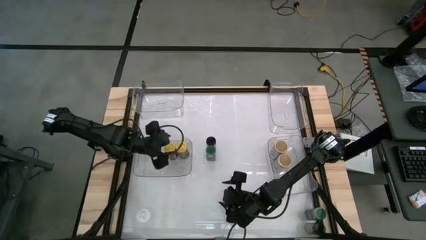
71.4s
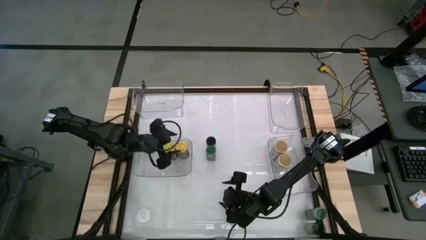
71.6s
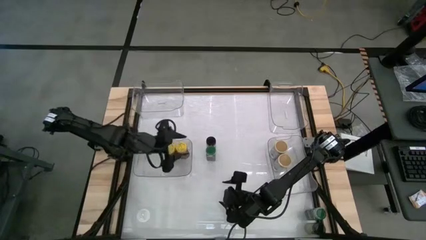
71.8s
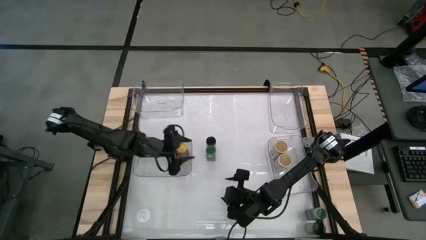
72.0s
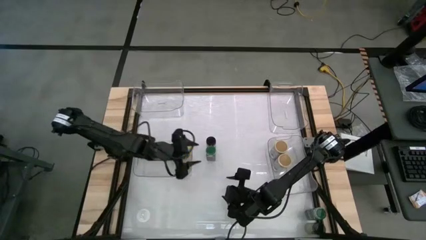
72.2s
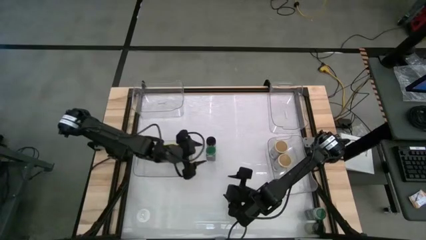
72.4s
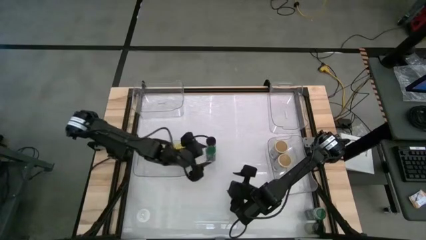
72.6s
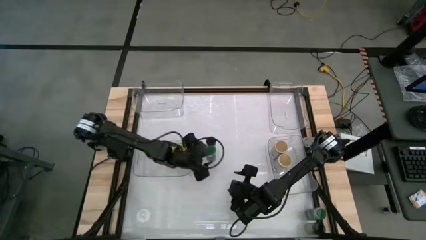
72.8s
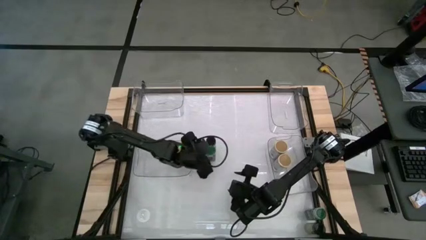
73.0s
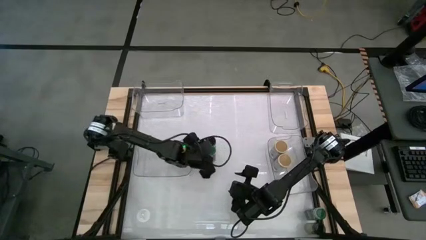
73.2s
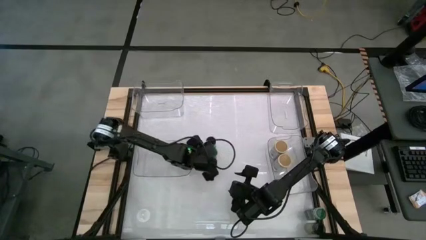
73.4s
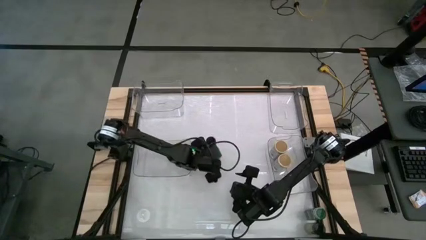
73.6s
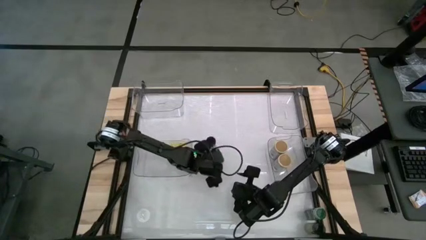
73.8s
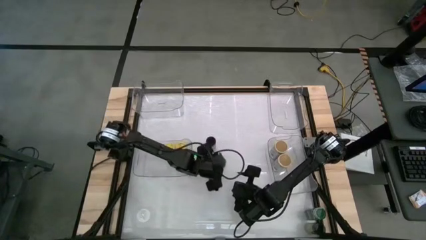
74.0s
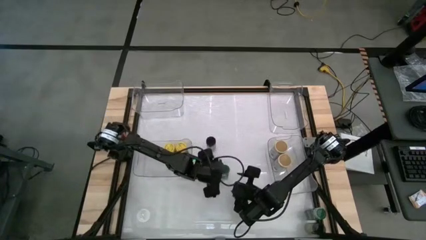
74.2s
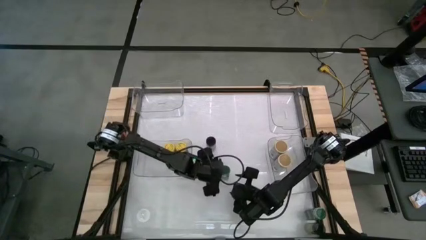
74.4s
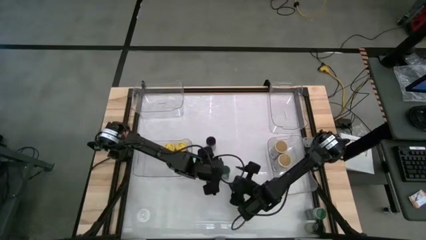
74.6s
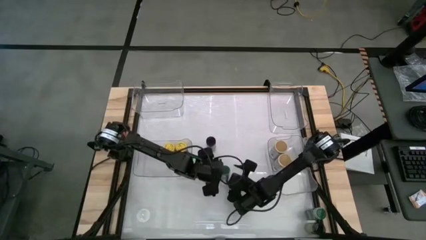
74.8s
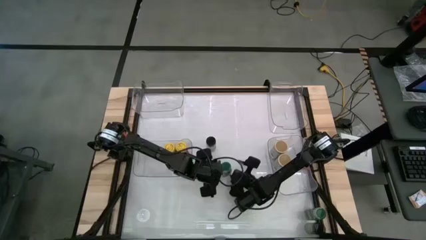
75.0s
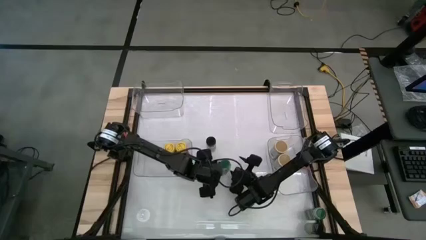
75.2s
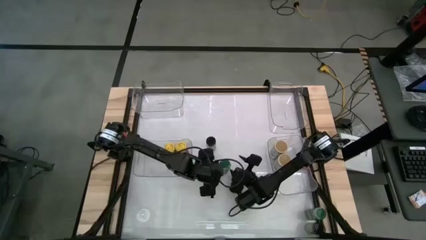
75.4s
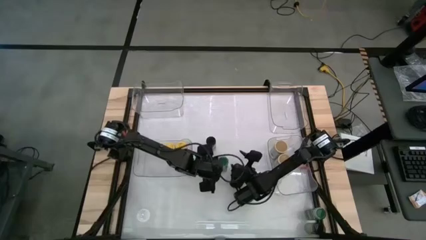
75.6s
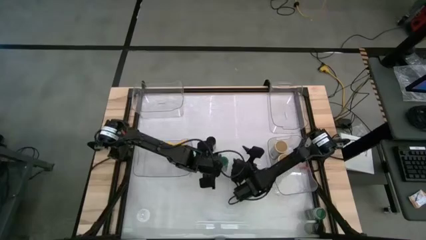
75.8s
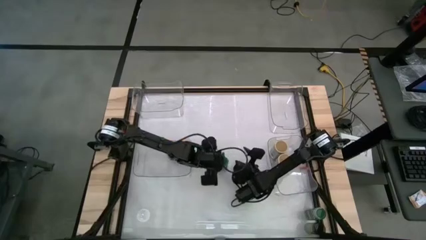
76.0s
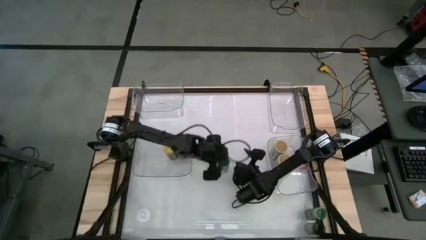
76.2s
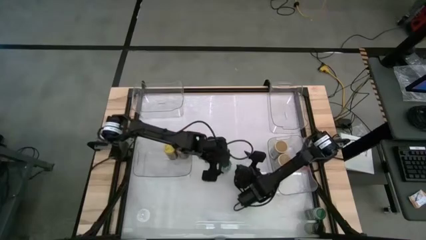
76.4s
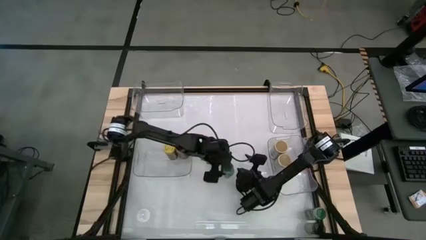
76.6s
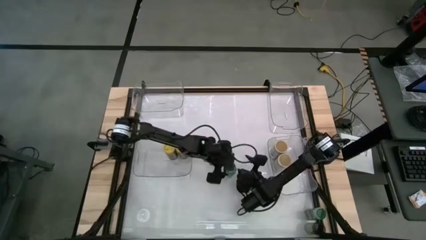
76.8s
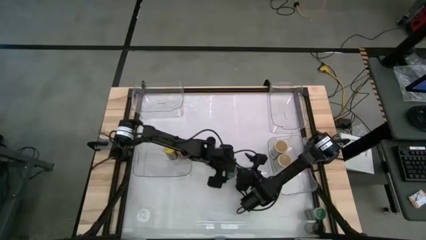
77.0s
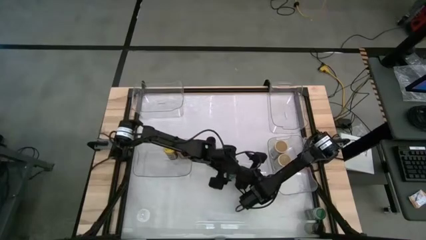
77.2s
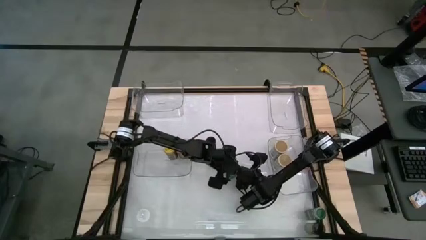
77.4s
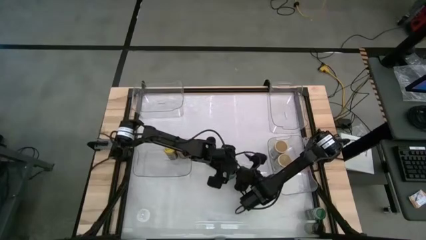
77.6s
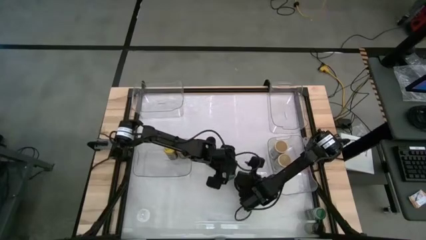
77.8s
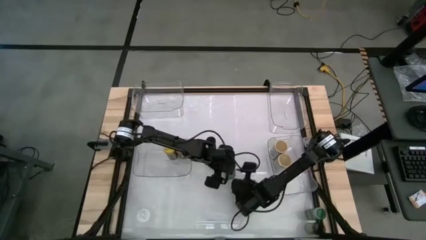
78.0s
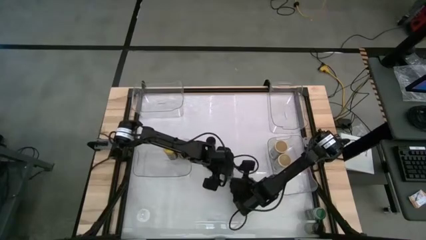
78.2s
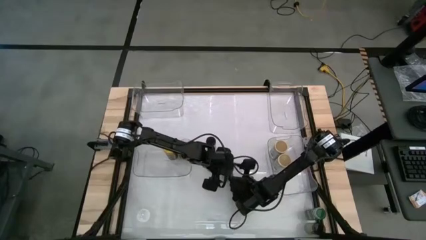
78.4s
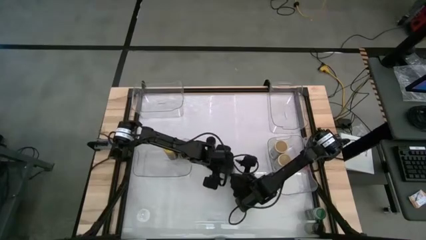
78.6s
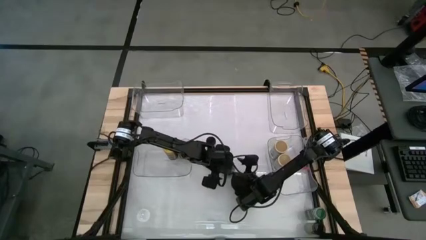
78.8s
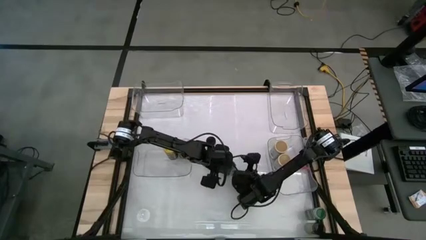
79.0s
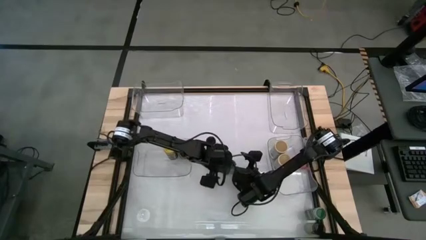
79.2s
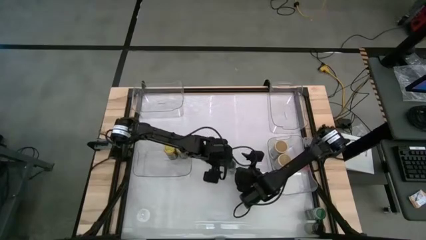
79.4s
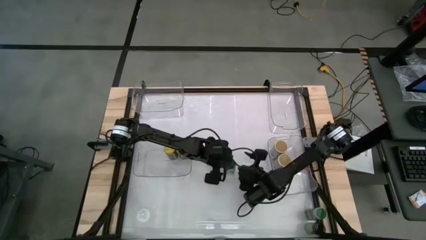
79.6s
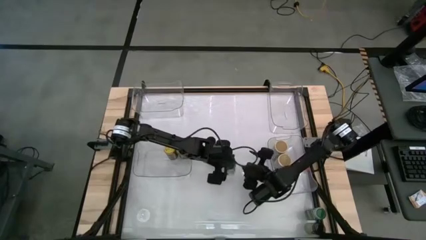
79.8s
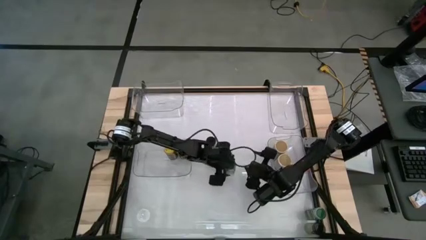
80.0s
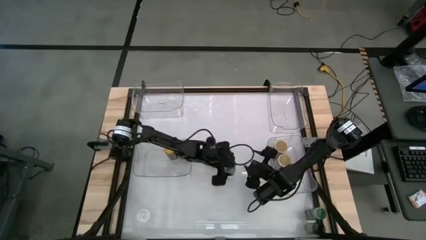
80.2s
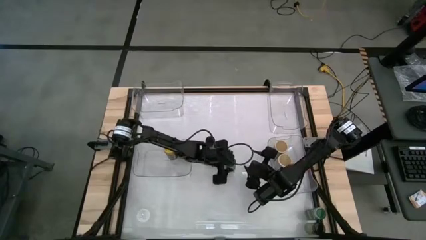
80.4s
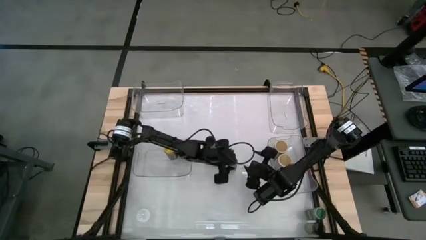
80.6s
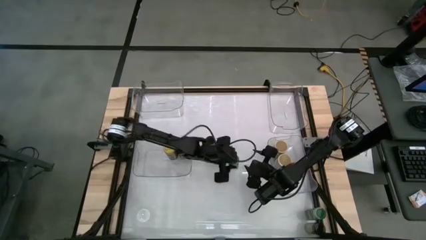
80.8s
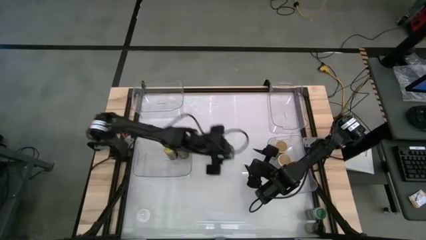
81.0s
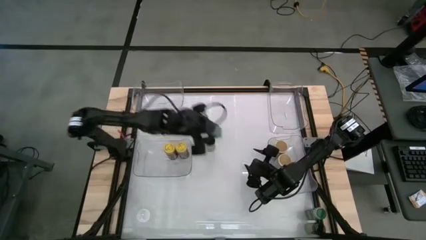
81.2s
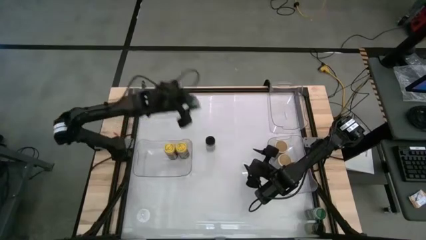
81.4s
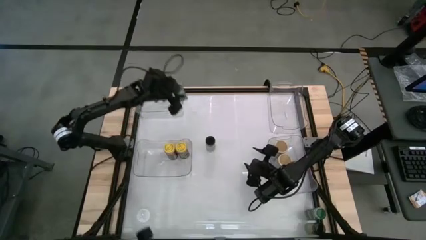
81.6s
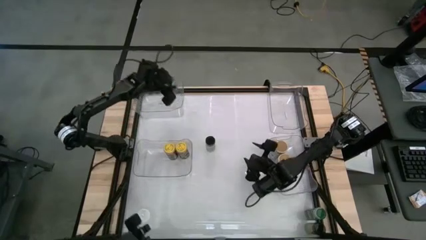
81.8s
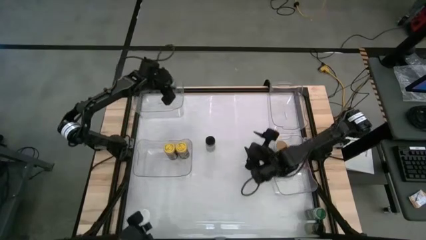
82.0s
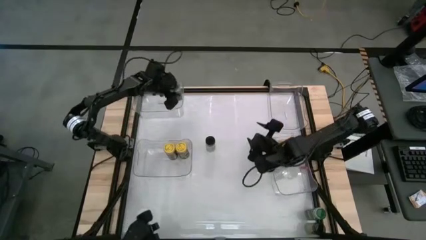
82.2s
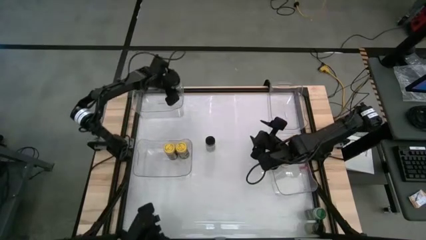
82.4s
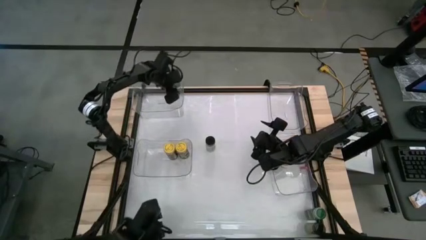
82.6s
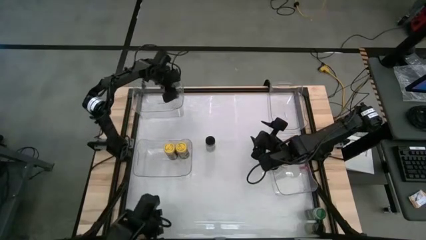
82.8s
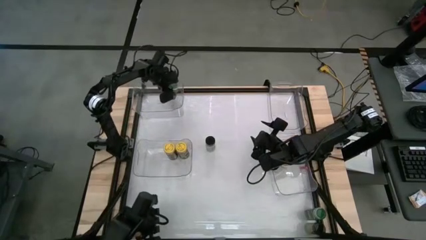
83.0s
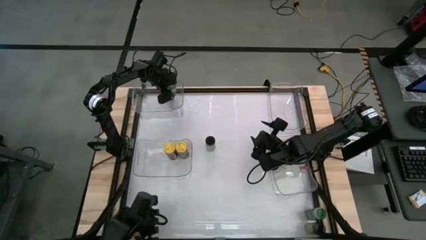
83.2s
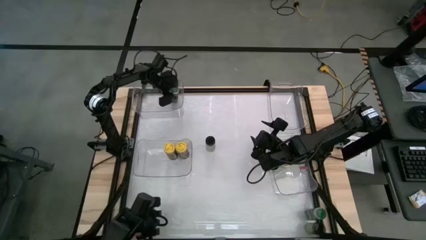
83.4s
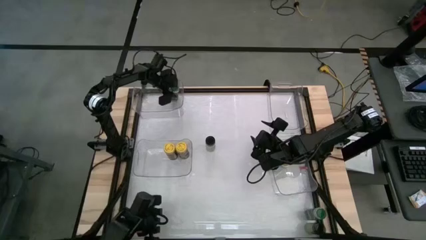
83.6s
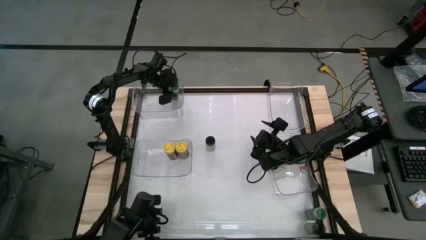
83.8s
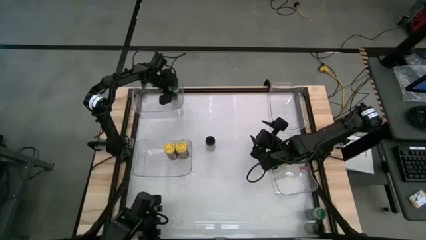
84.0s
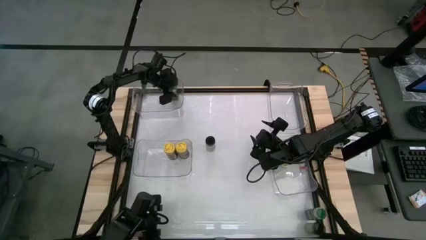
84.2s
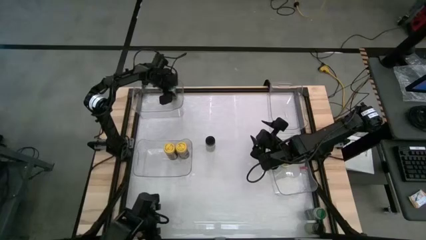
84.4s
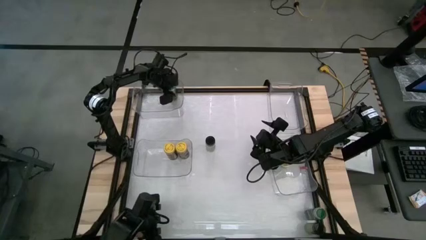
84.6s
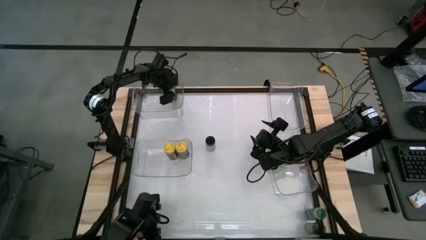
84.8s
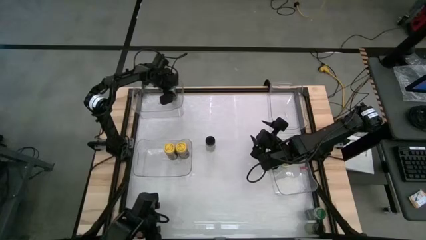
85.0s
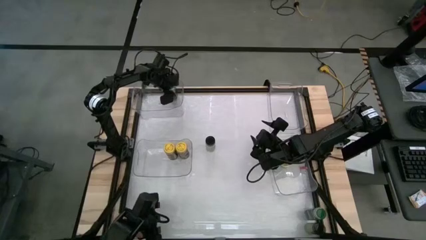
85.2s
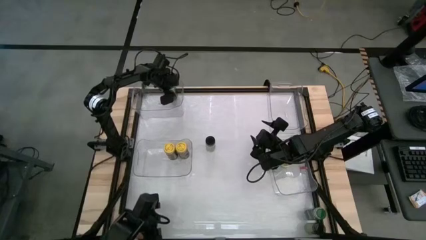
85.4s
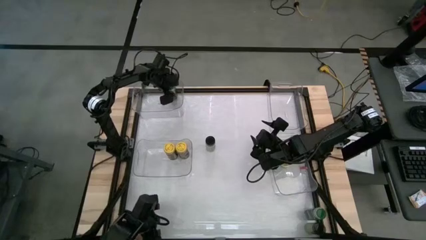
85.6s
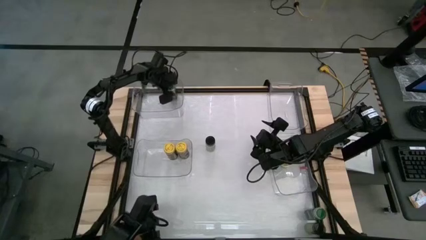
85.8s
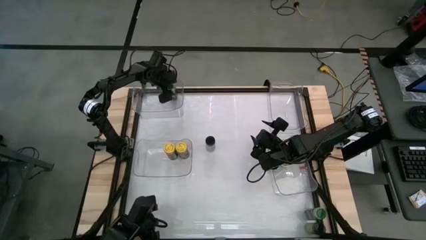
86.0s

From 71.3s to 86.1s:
Task: Sort spices by type
Put the top green spice bottle into the top left transparent bin

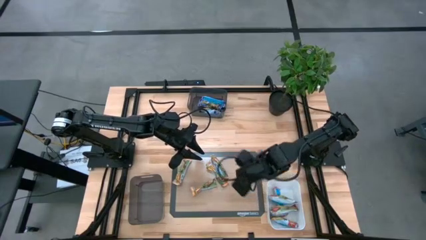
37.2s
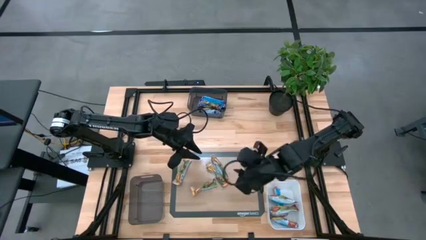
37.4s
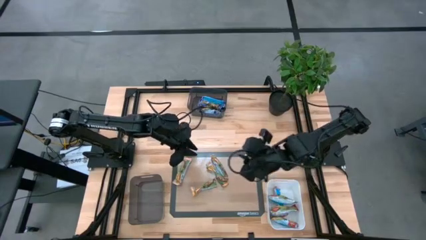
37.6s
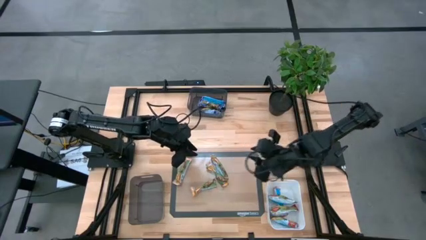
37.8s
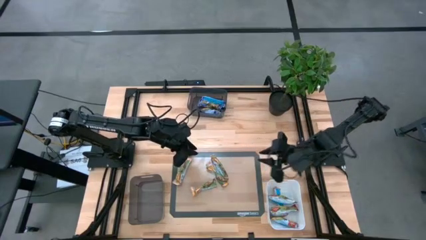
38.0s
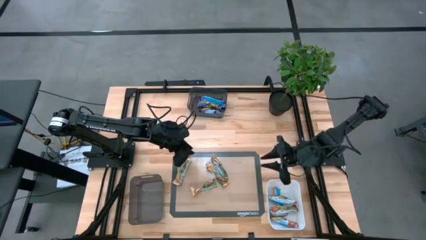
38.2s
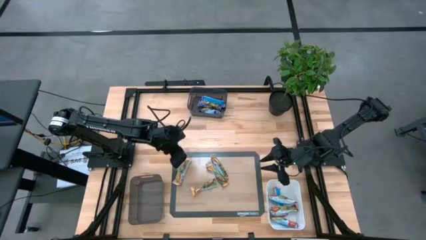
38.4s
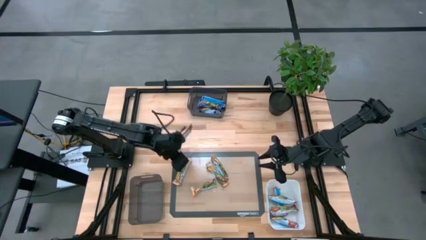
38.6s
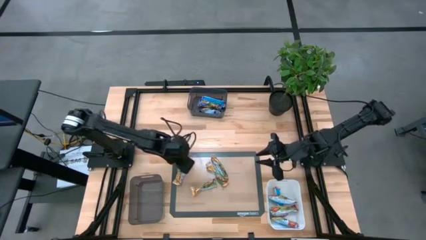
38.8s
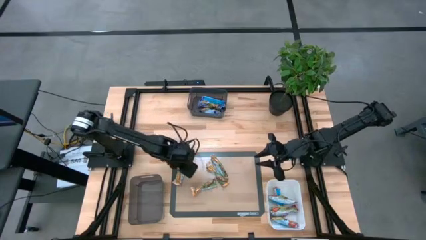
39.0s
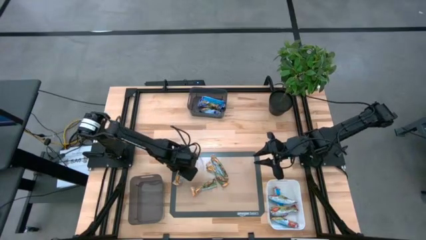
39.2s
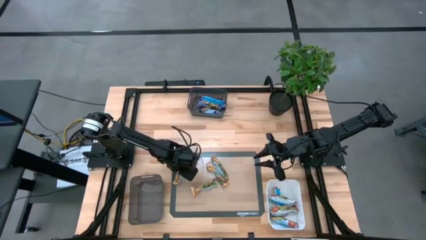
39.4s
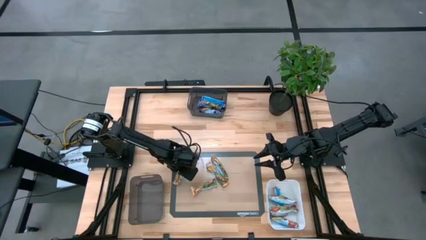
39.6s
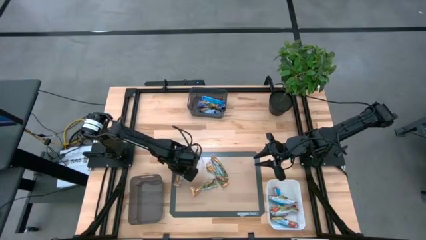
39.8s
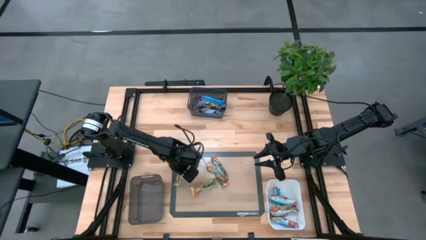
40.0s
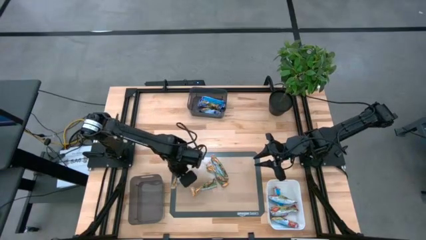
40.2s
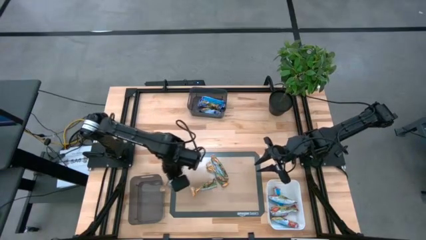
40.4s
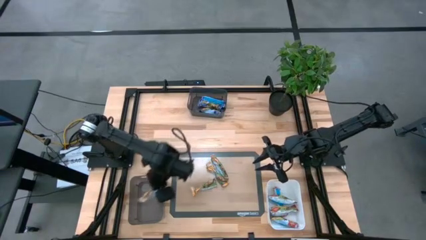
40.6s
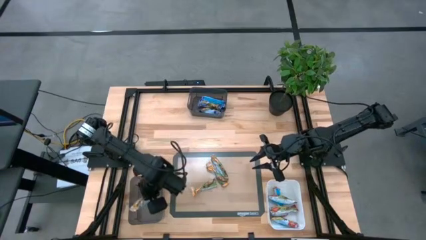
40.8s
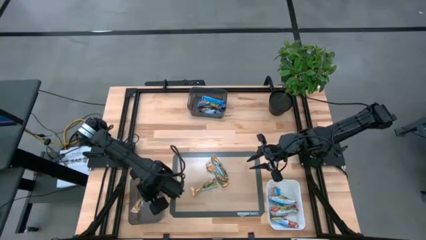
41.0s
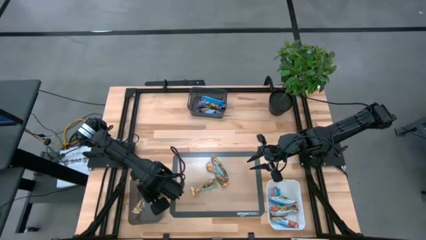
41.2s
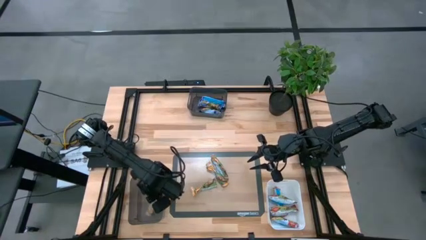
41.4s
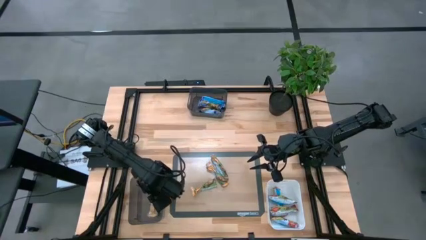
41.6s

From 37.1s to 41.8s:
Task: Pick and place Granola Bars by type
Put the left orange snack bar into the bottom black transparent bin
